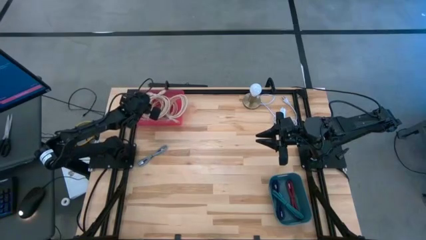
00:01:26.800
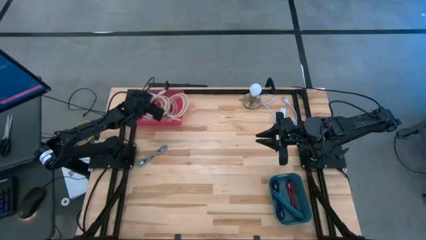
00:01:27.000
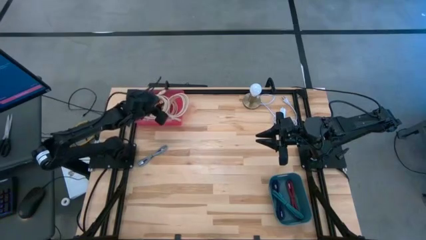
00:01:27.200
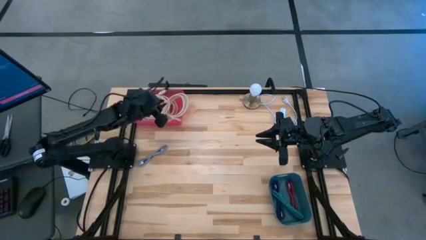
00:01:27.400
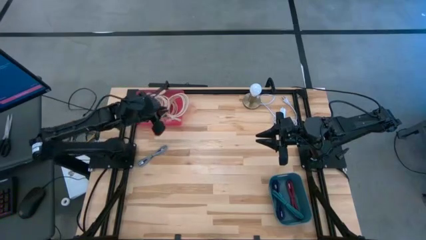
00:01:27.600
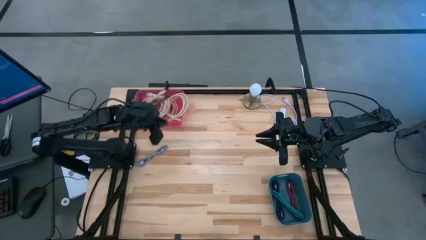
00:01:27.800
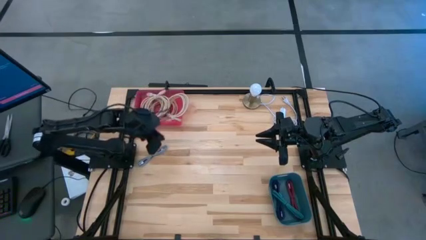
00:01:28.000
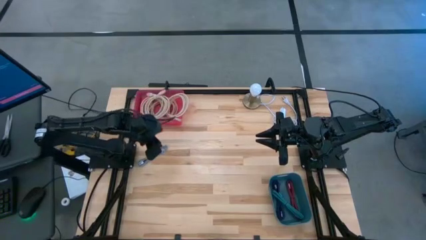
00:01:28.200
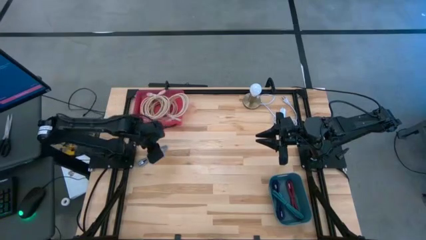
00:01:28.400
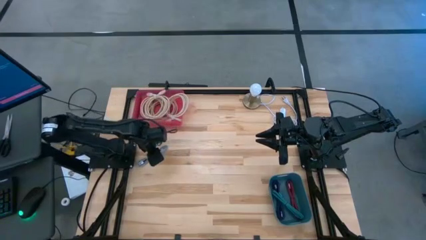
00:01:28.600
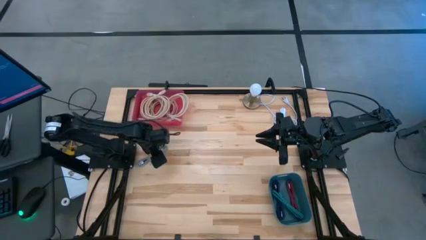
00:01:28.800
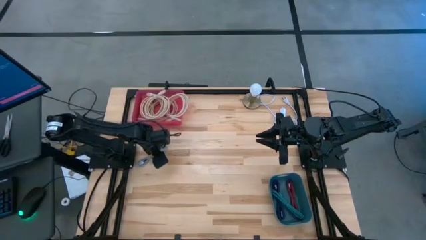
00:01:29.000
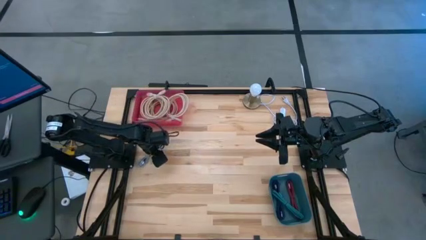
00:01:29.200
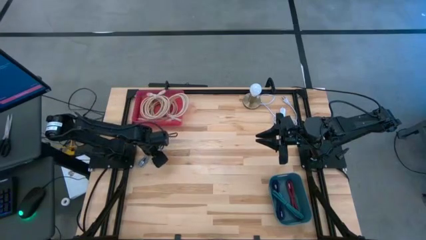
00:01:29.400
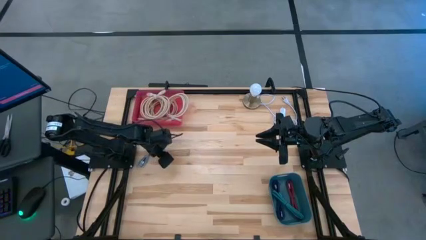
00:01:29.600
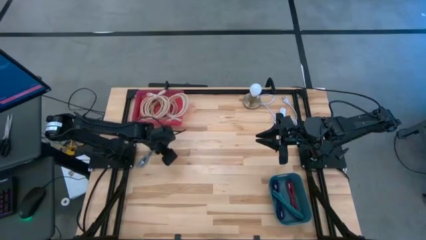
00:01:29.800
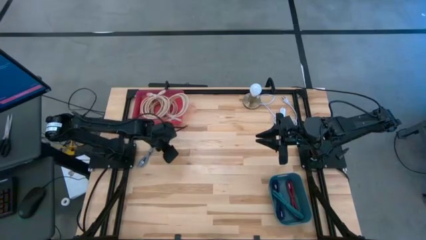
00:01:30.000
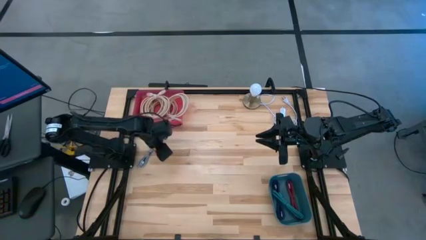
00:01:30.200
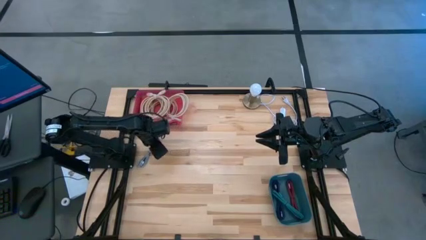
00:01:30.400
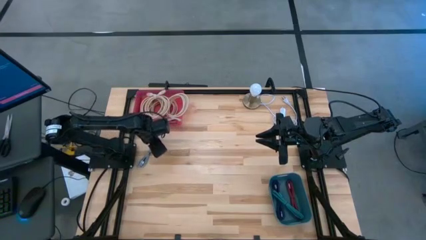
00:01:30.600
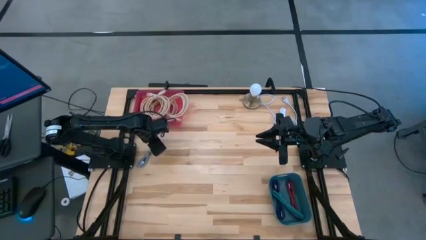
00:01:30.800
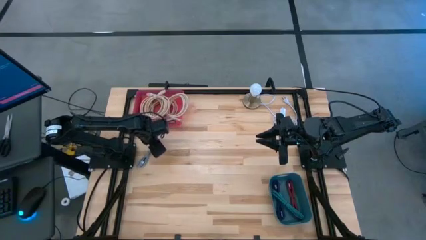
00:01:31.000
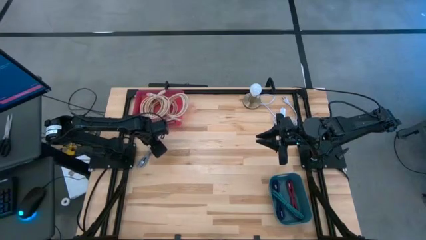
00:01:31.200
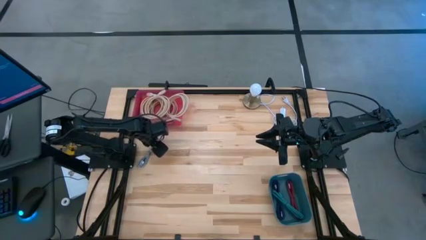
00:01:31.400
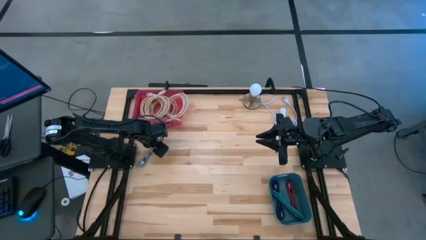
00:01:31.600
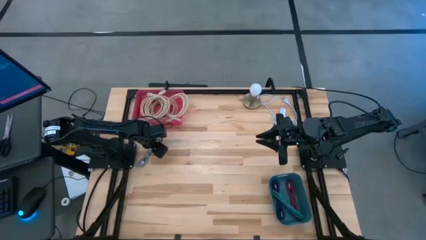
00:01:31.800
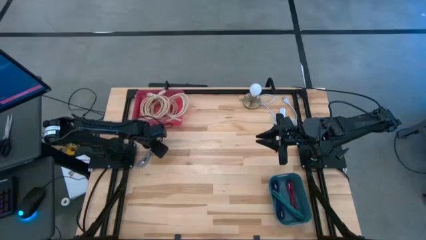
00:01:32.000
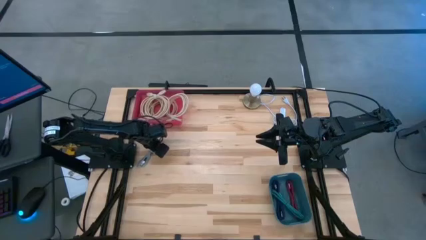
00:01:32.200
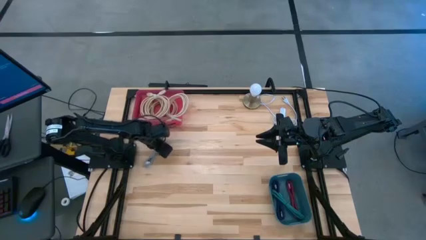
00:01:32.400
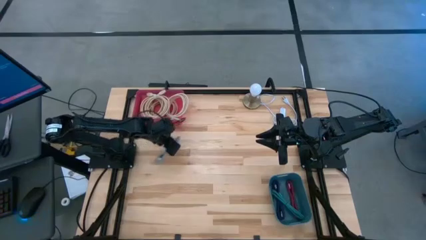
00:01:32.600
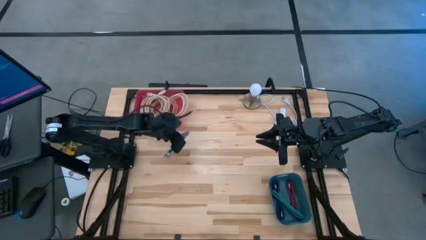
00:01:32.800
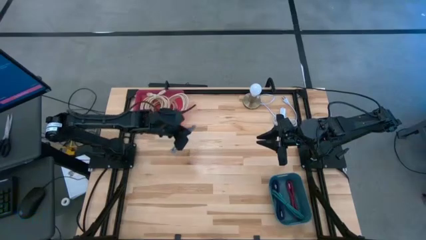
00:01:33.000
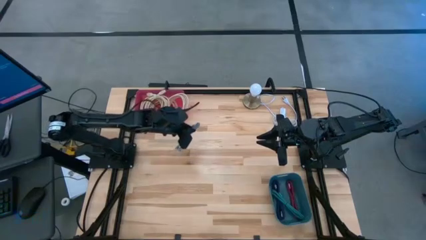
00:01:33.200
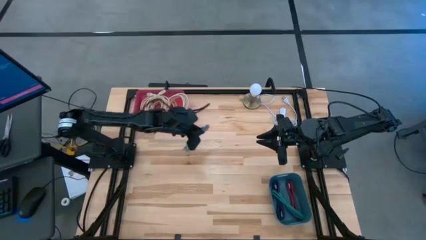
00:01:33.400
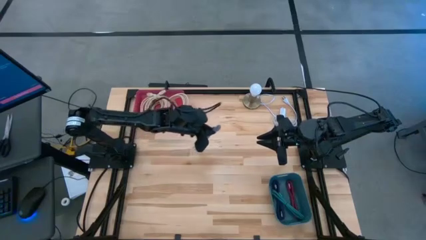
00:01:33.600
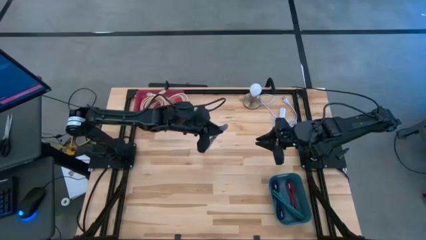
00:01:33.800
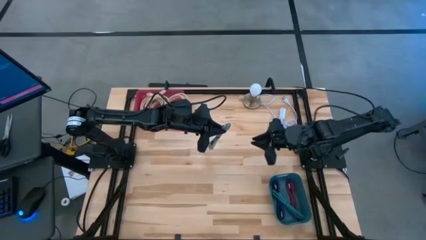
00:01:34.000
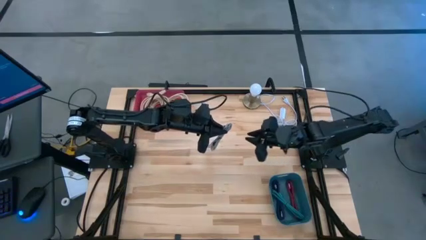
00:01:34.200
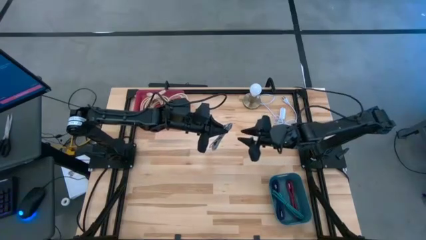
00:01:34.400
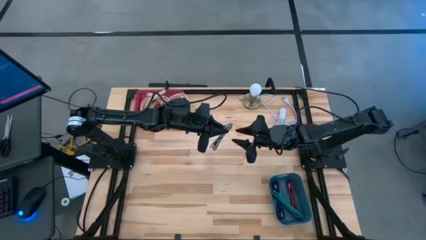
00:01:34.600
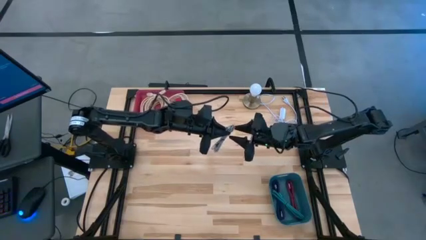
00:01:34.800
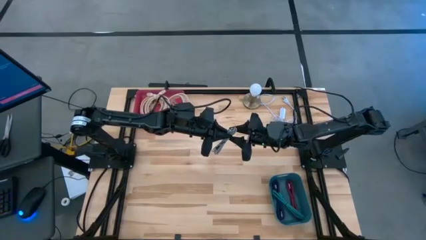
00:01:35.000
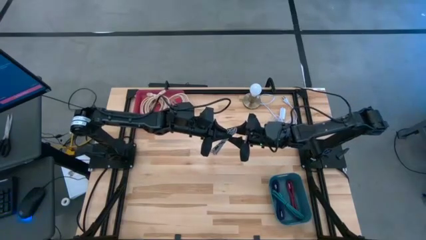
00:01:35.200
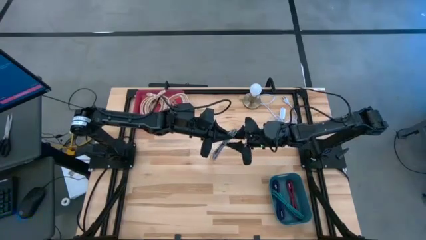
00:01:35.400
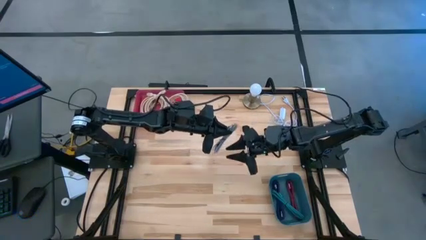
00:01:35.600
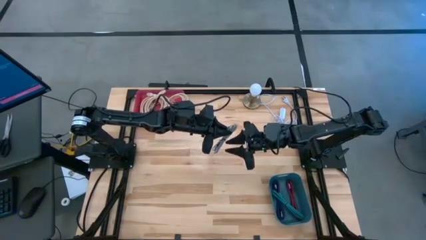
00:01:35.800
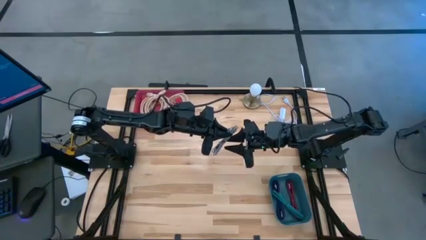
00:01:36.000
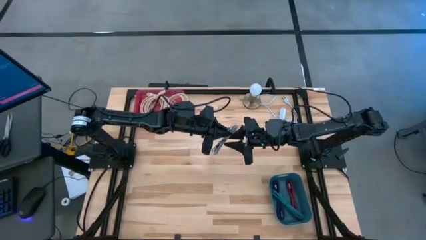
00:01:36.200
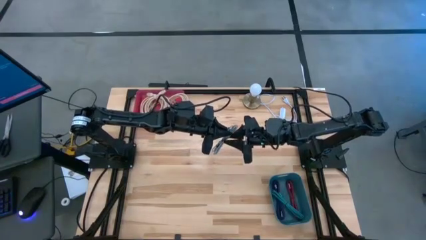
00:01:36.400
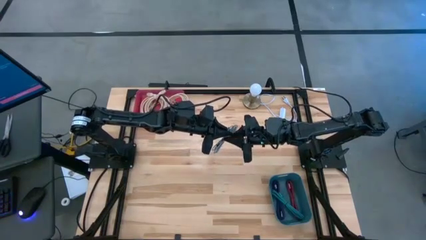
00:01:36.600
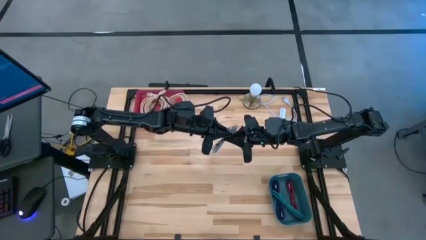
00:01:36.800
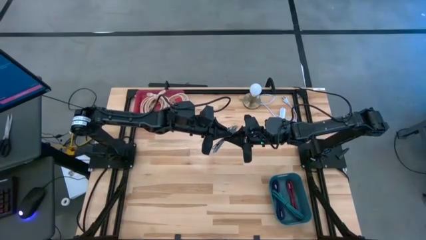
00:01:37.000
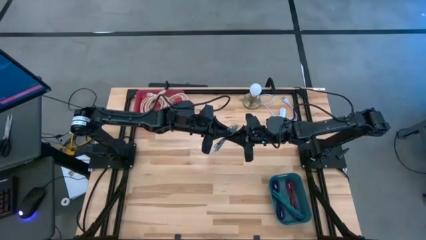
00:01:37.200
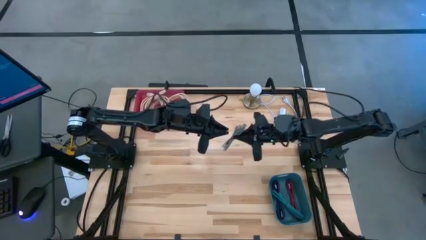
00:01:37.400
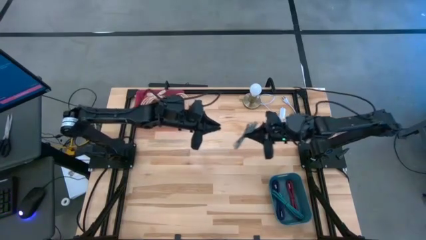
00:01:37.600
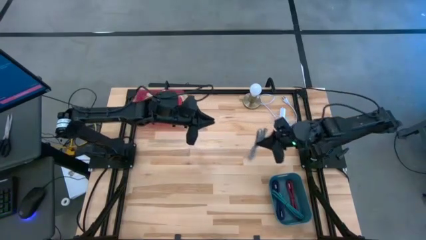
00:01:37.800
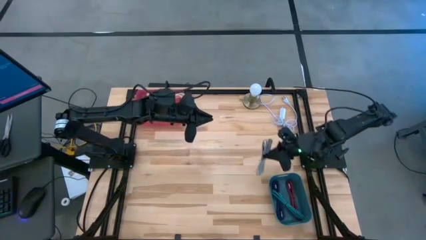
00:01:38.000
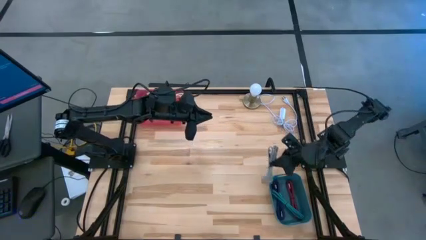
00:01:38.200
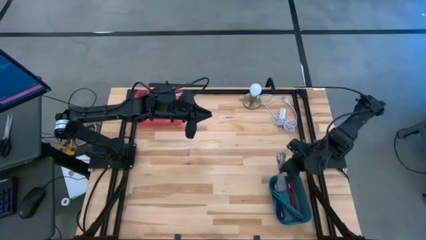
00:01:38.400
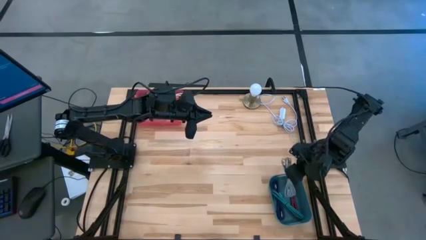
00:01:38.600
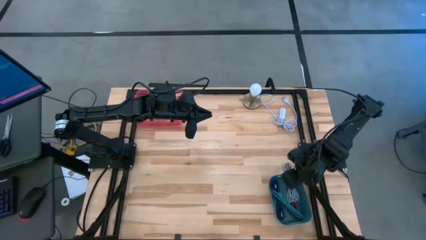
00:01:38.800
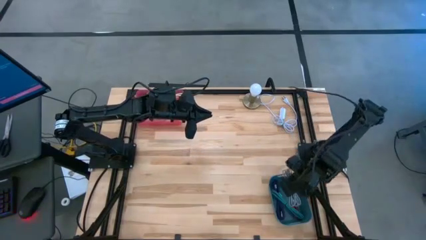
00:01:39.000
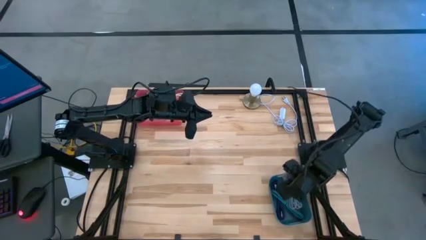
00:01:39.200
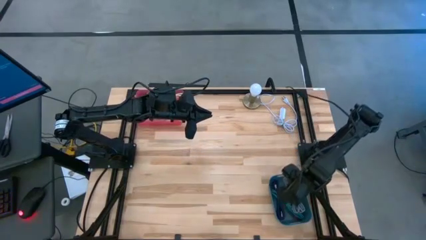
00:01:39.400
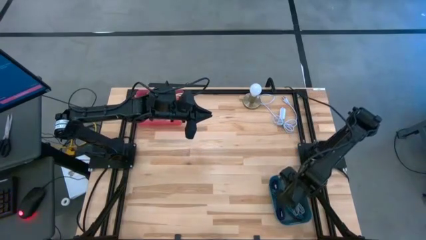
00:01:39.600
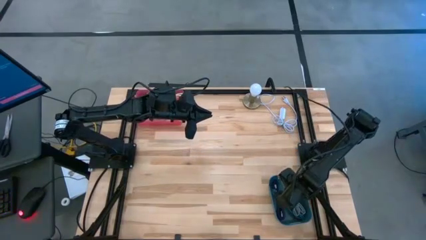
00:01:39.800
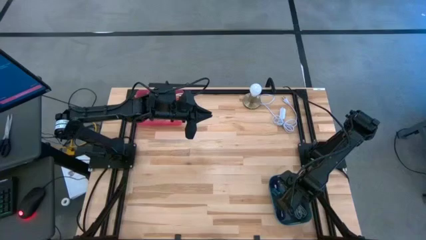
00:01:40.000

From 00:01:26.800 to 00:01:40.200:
Task: Pick & Place USB Port
Put the black and white charger cable into the blue bin

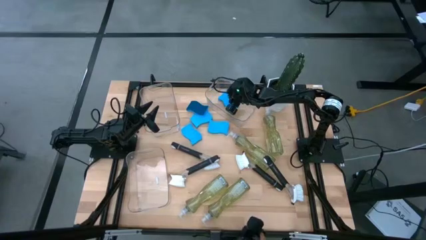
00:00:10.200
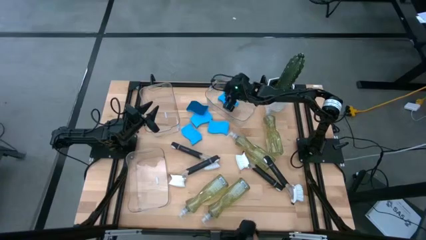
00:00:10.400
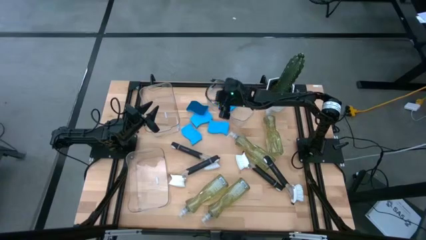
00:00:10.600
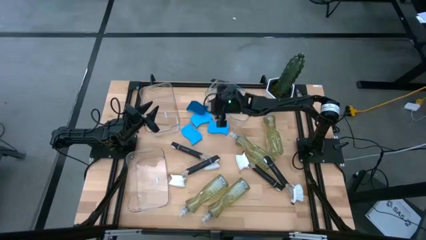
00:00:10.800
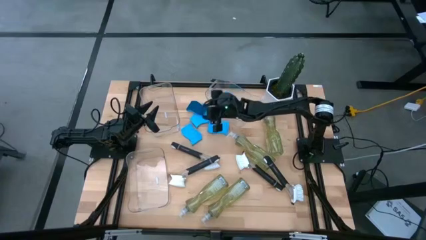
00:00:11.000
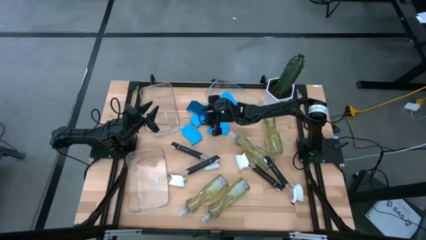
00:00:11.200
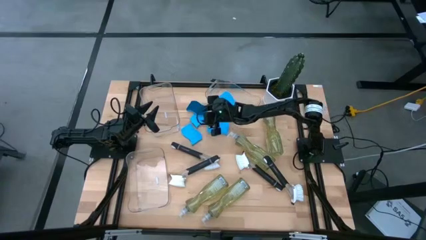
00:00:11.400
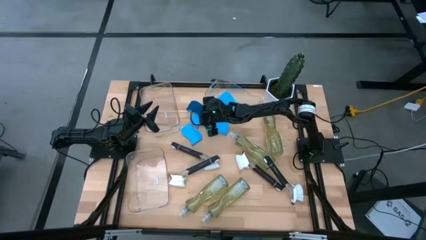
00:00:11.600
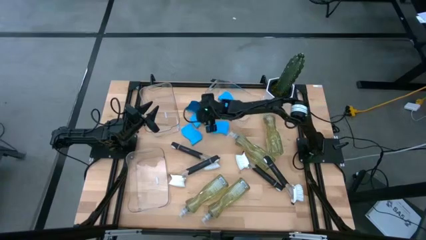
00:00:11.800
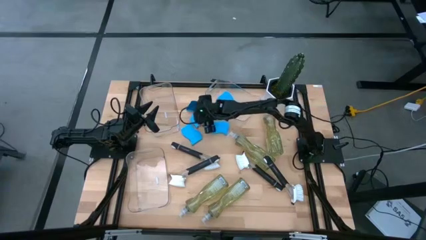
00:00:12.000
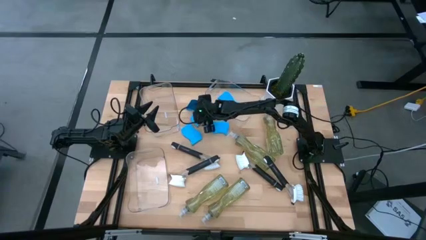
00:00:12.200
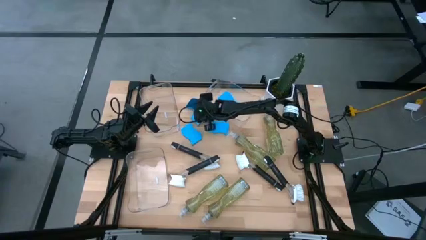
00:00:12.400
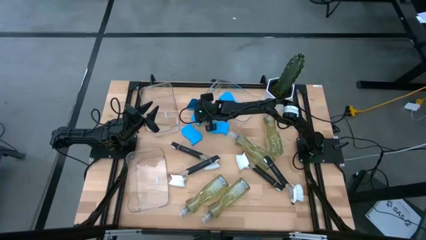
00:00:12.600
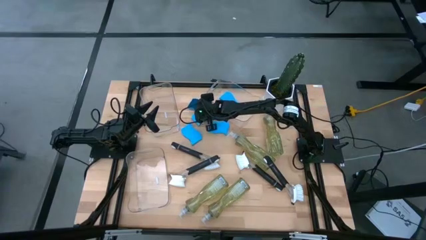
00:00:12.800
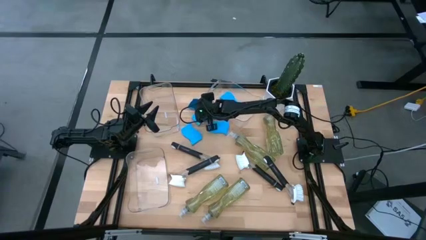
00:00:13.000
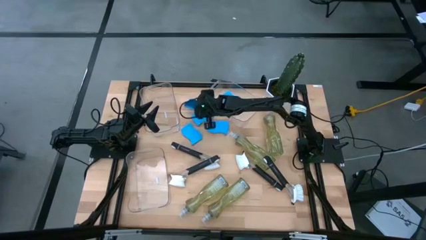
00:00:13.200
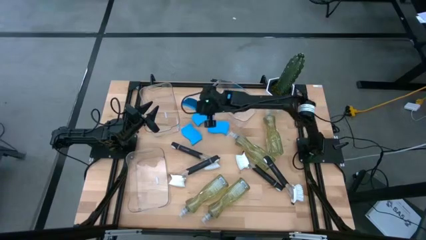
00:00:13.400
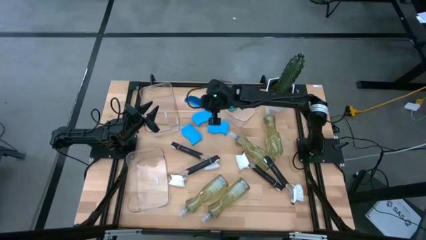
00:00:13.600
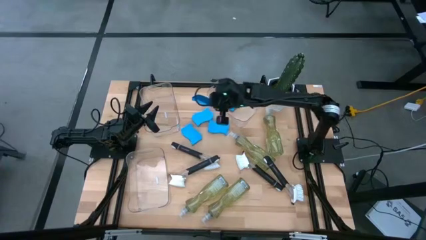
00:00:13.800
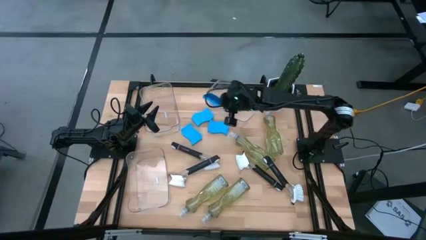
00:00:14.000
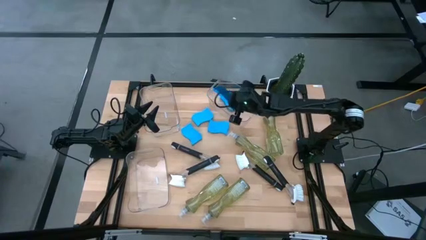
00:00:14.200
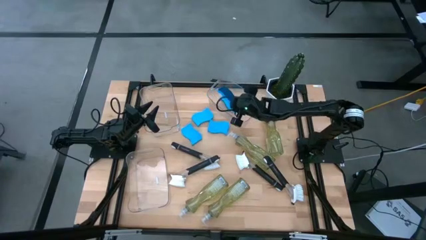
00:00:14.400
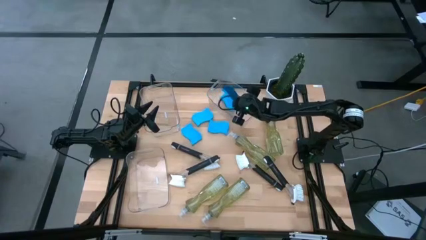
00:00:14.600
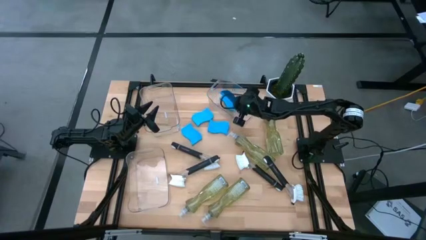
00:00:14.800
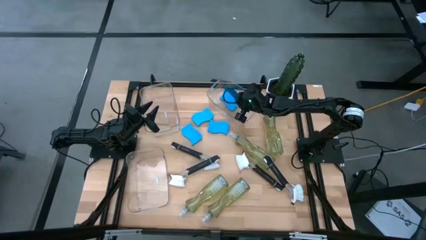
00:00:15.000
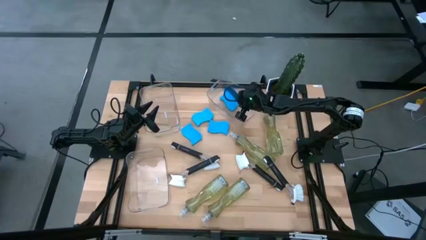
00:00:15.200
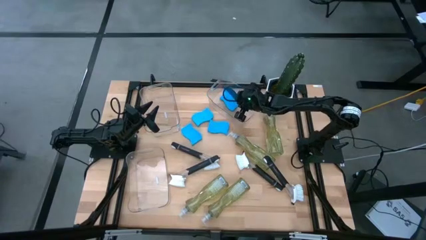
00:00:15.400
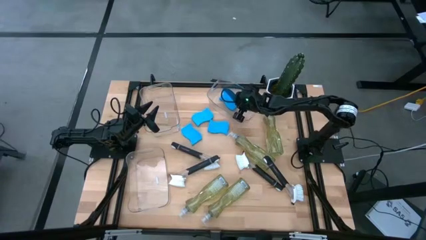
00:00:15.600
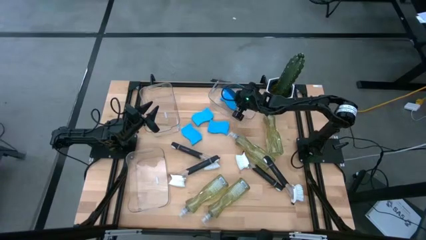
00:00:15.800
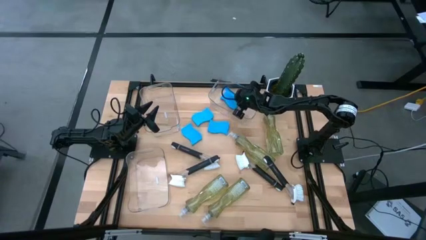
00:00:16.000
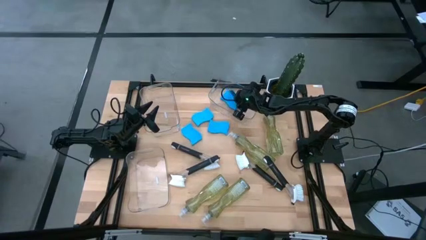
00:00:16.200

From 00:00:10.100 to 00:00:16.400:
Task: Pick & Place Kitchen Sink Supplies
Put the blue sponge into the top right transparent bin
